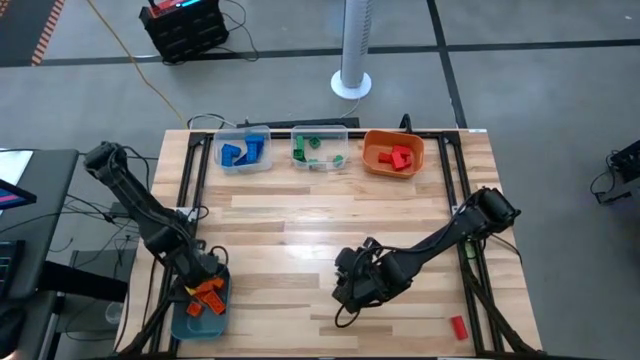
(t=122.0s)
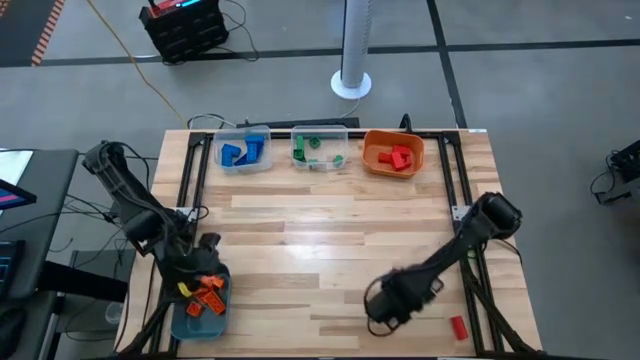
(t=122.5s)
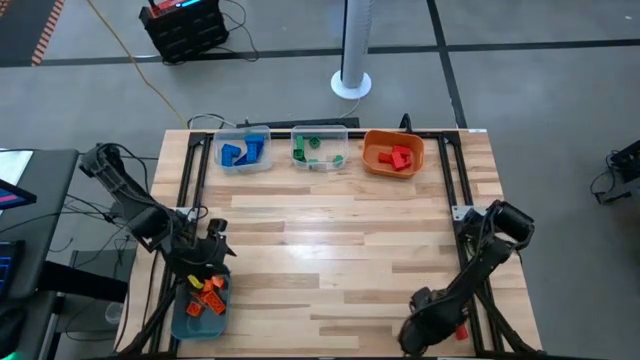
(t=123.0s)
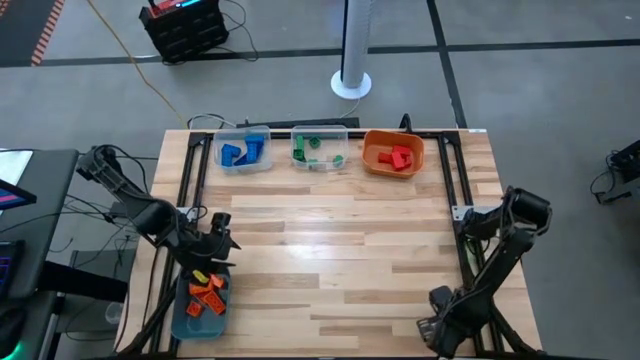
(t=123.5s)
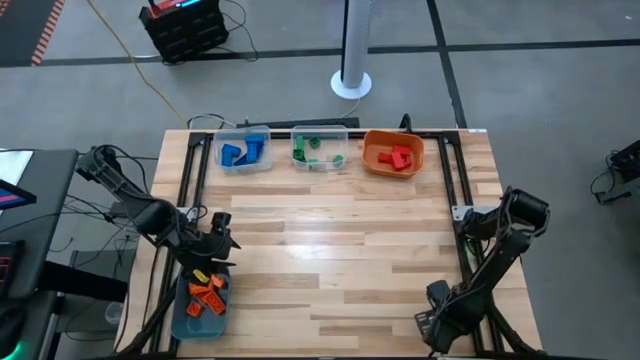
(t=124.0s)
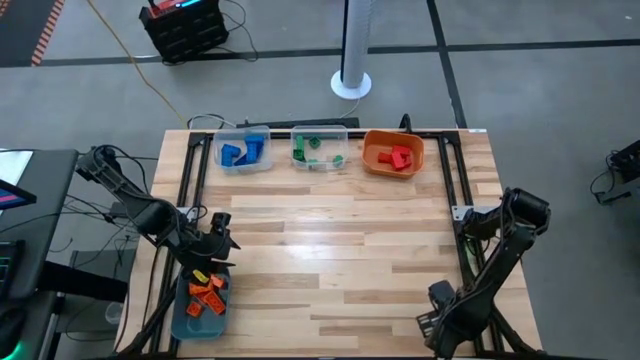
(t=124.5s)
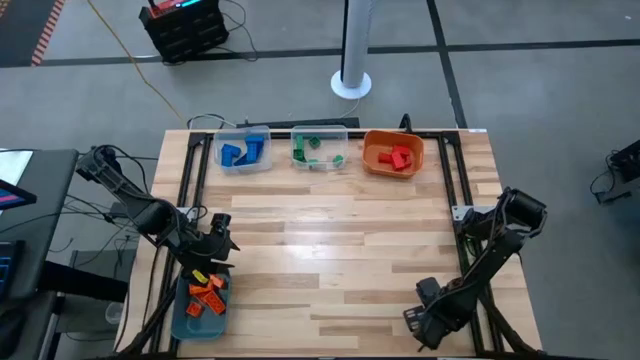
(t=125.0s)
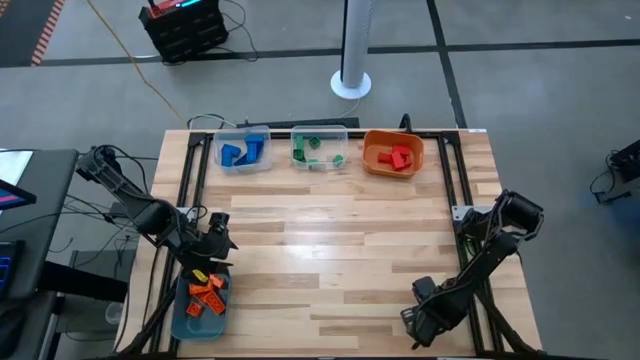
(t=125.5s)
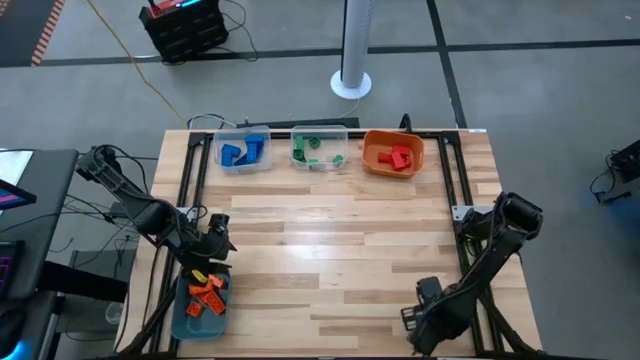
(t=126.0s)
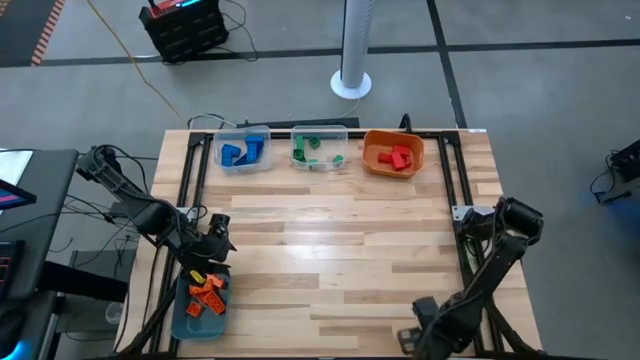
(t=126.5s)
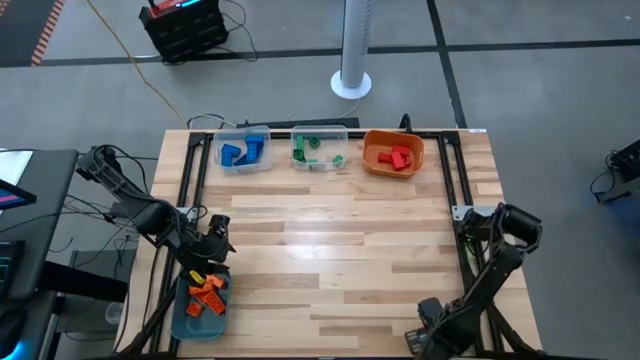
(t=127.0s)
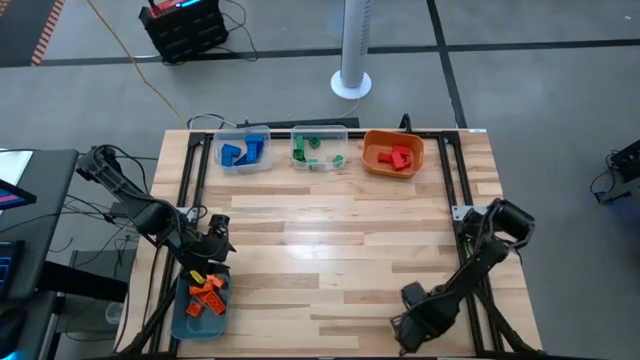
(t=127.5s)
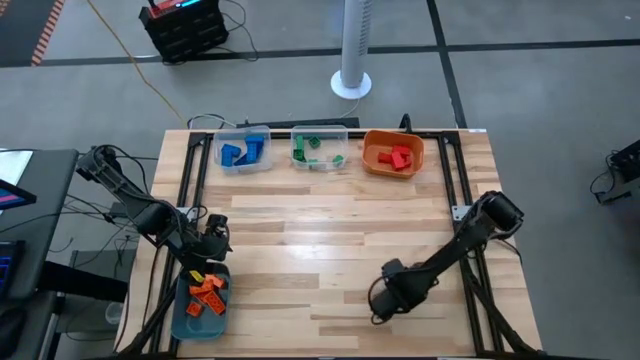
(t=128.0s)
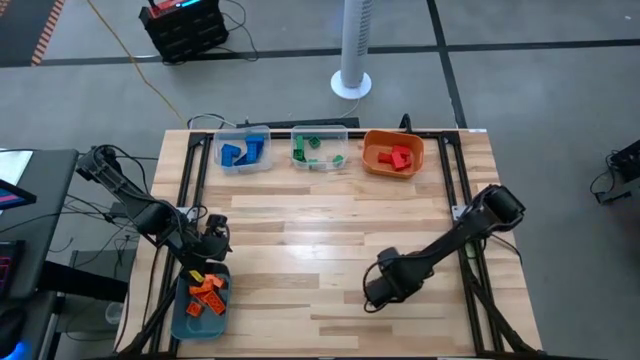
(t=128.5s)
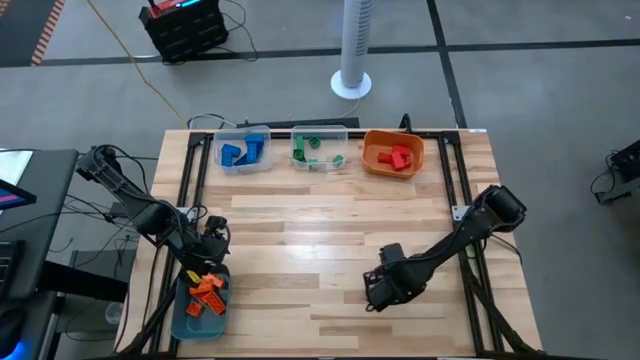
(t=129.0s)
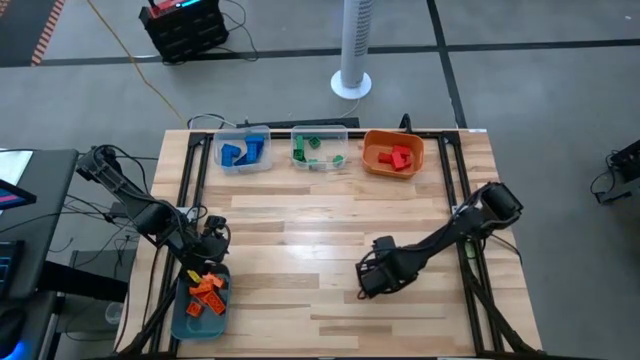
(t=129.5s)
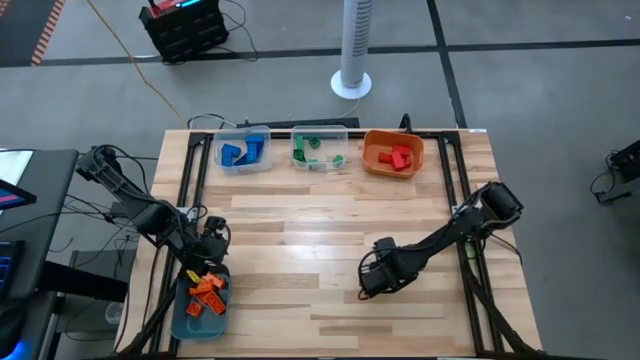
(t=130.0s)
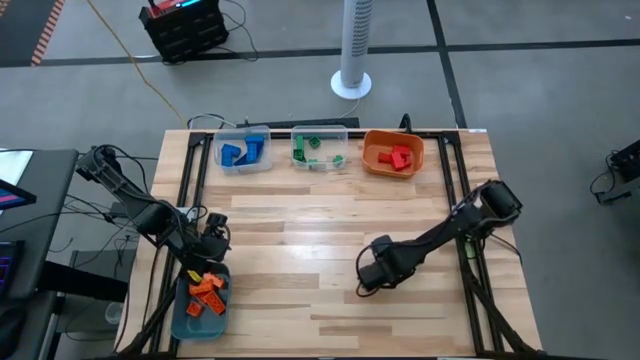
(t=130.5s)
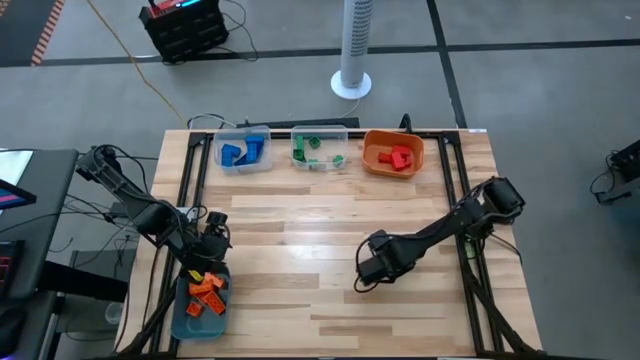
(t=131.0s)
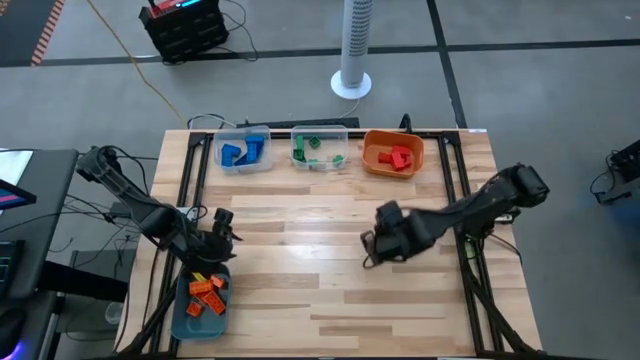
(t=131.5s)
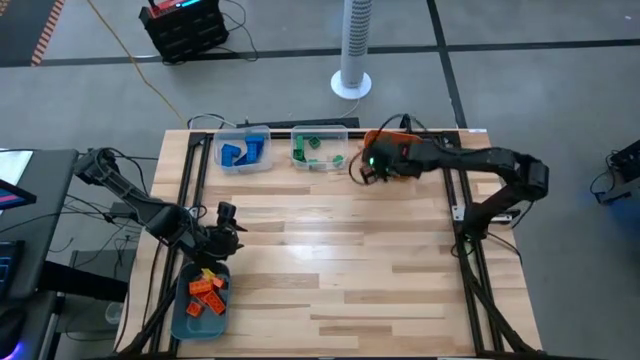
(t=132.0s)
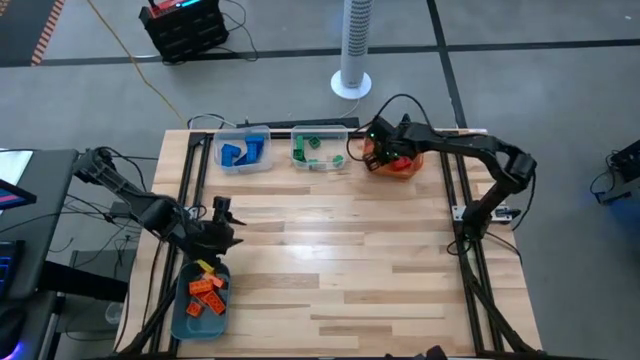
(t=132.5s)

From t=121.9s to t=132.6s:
Task: Sort blocks
Put the red block into the orange bin

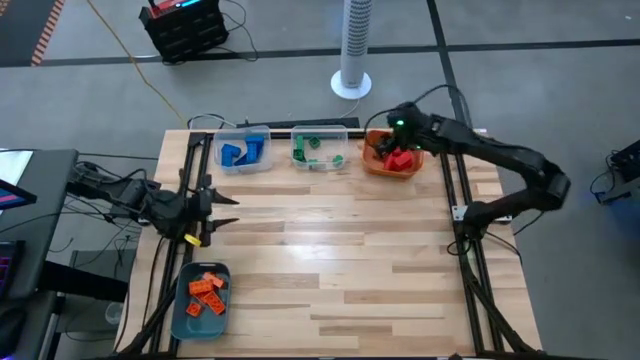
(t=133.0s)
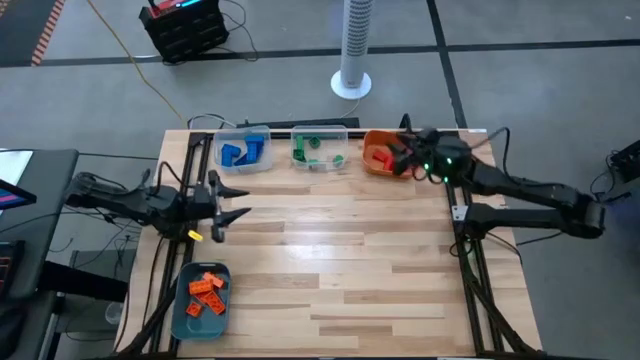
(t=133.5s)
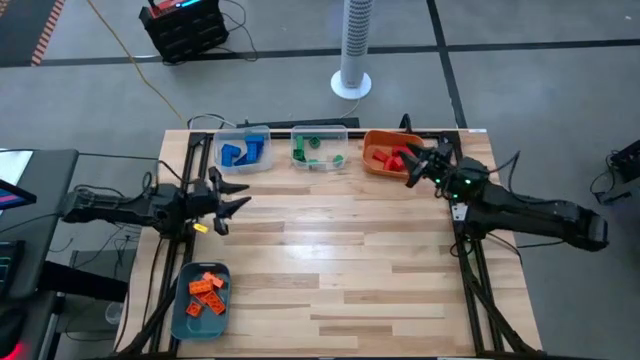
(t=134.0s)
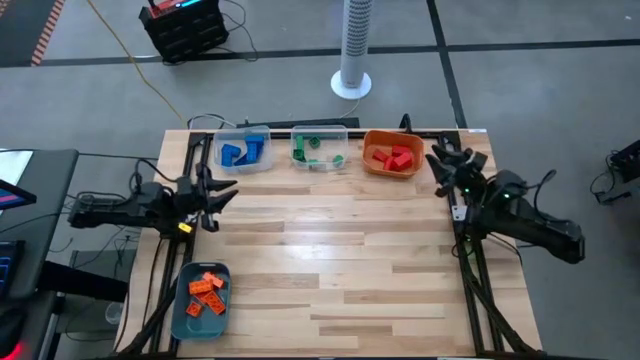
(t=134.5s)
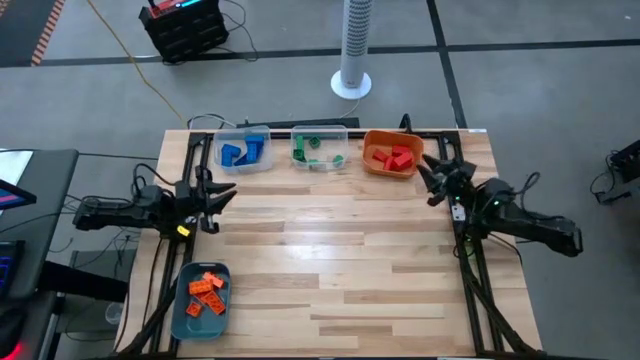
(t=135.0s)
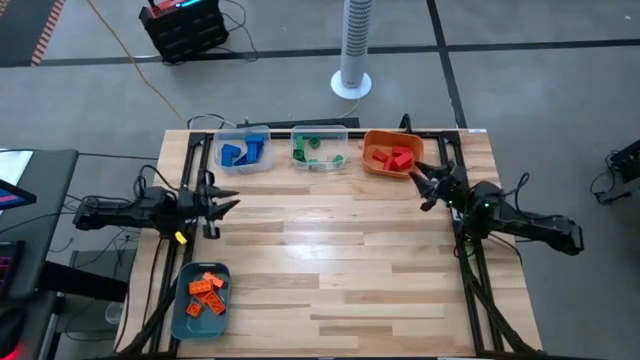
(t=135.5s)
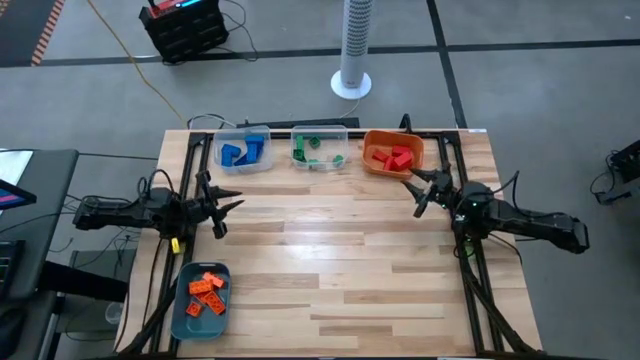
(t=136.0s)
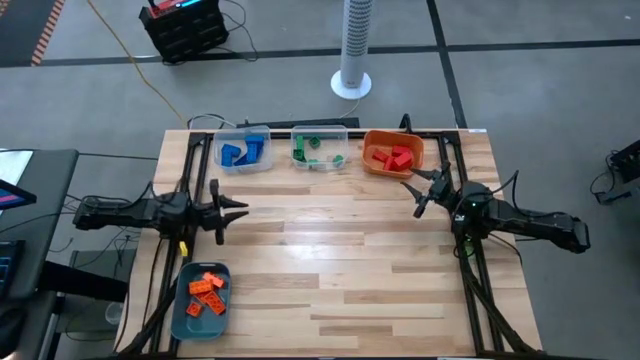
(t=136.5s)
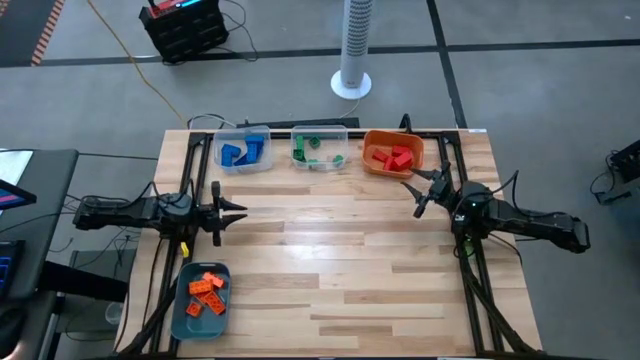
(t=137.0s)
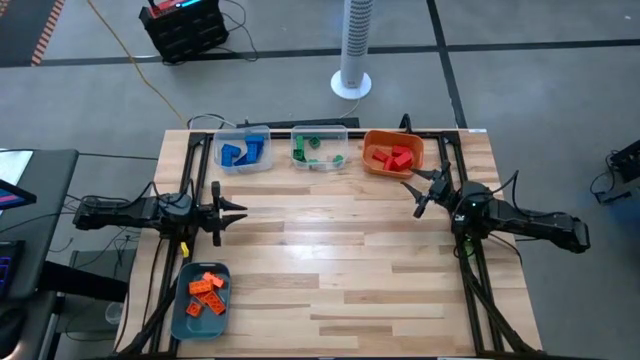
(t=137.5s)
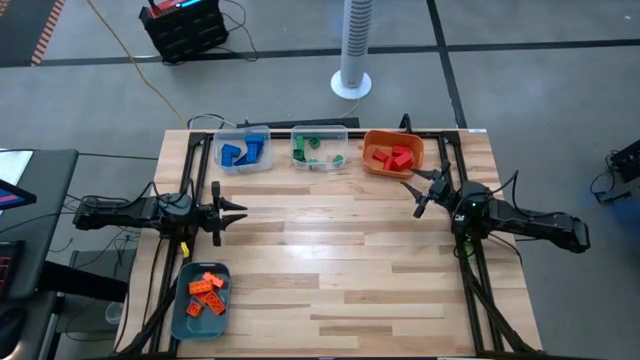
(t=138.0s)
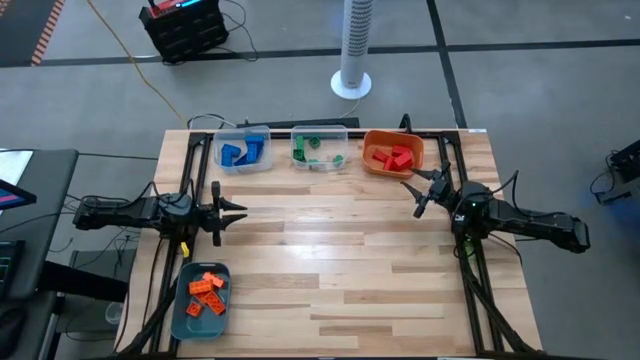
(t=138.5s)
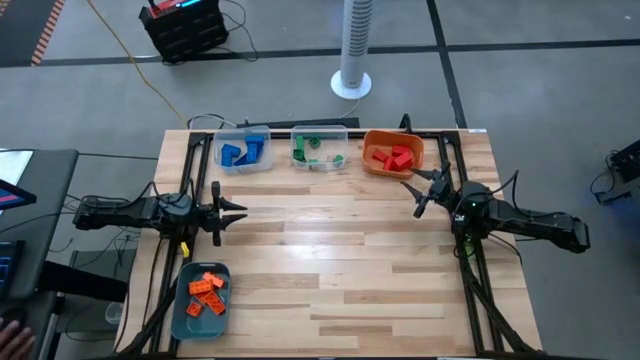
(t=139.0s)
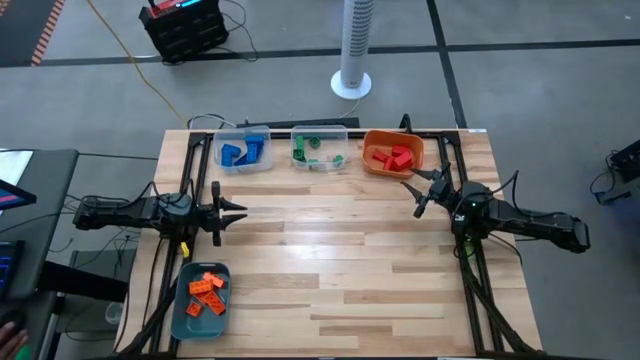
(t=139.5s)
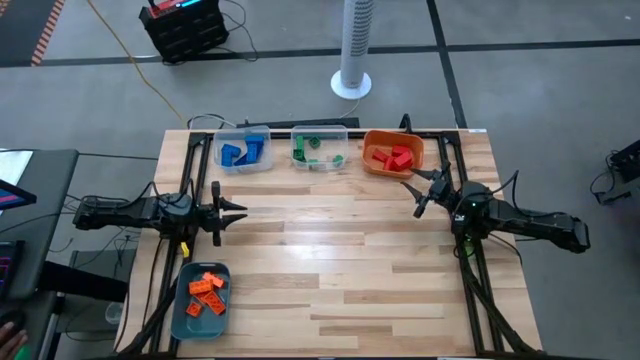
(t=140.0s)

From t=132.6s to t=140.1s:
Return to Home Position

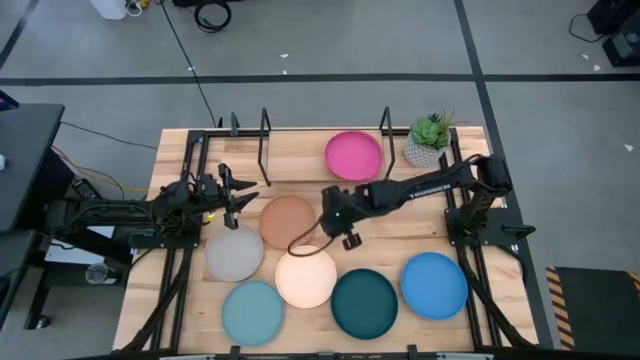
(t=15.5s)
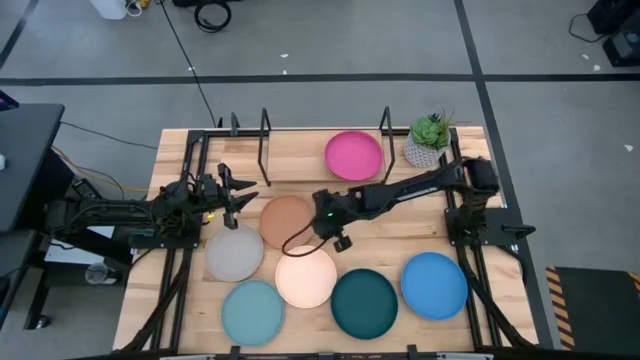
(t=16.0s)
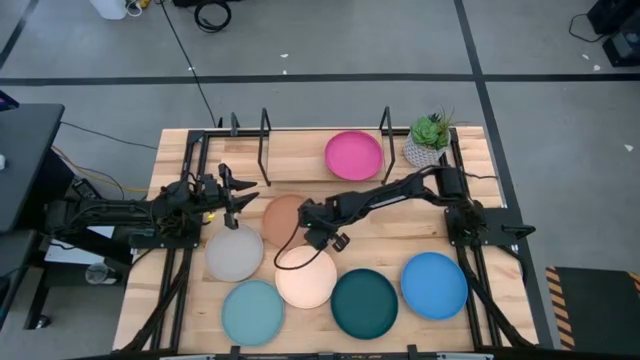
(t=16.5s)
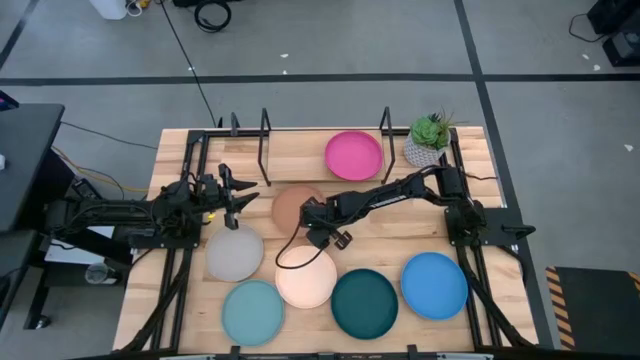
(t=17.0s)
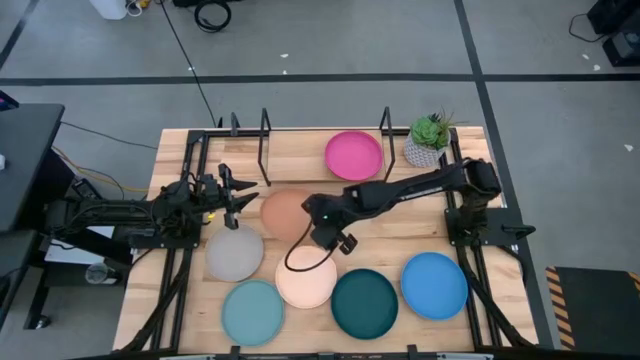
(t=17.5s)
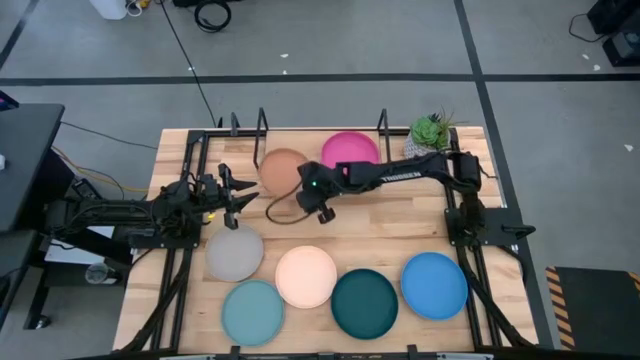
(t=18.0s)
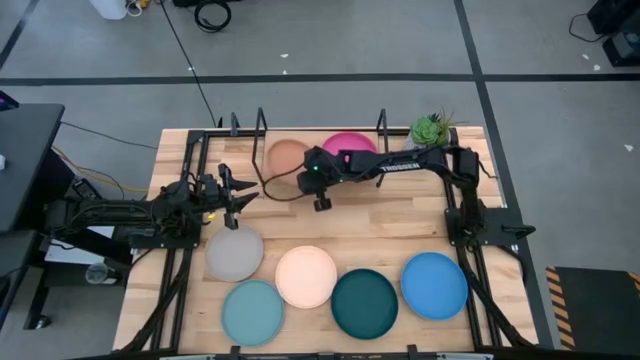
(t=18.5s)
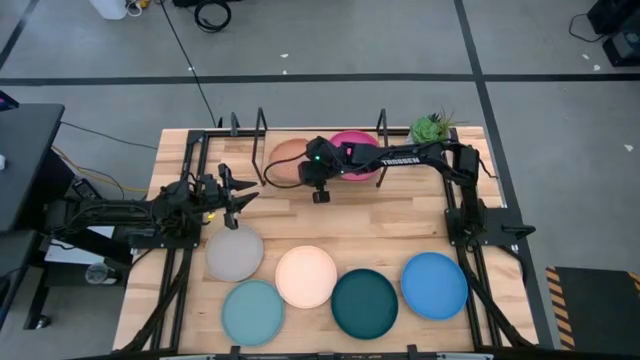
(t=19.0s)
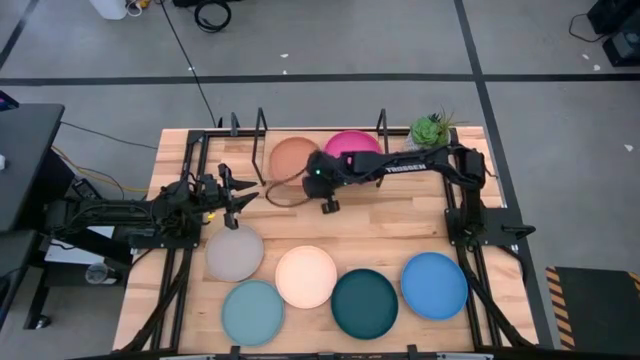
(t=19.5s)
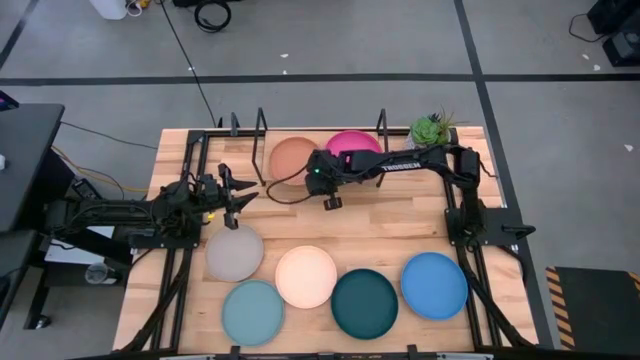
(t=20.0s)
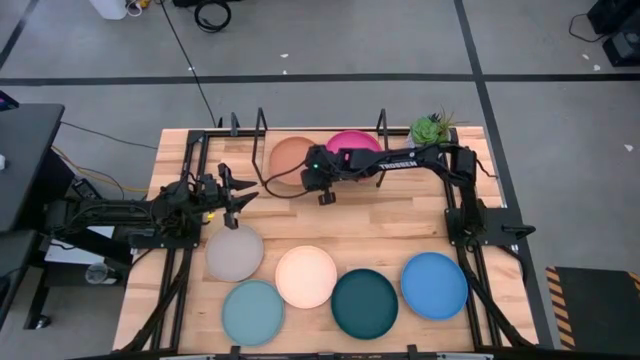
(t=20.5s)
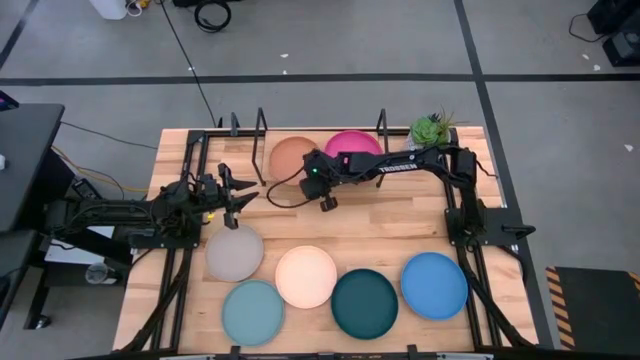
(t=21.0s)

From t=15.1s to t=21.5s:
Task: Place and stack plates onto a shelf
Put the brown plate on the shelf
